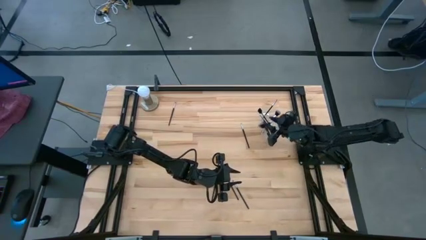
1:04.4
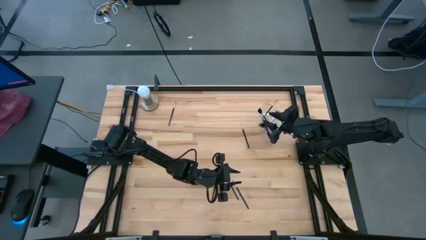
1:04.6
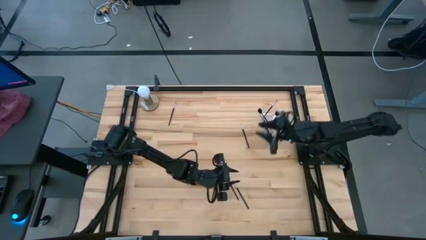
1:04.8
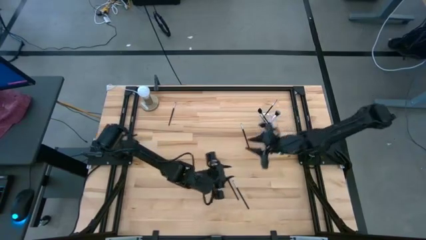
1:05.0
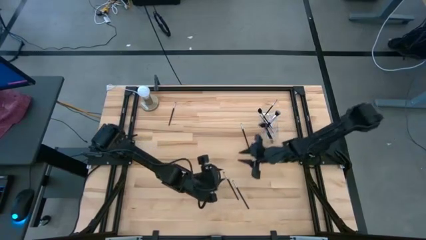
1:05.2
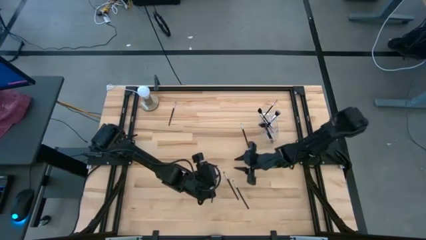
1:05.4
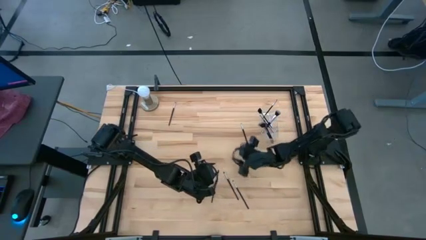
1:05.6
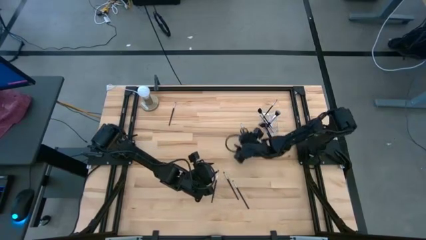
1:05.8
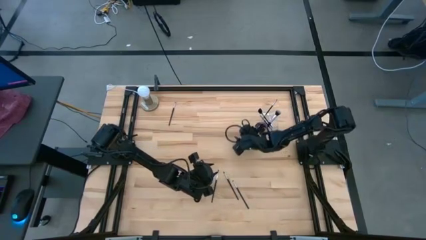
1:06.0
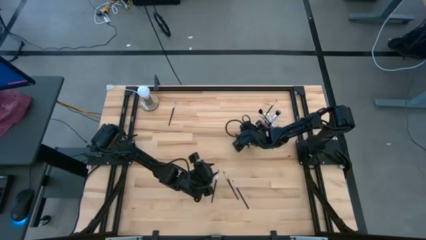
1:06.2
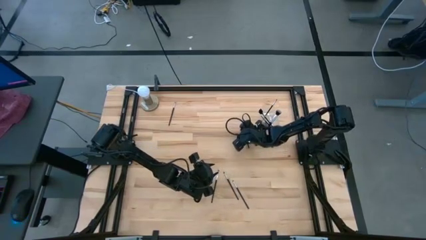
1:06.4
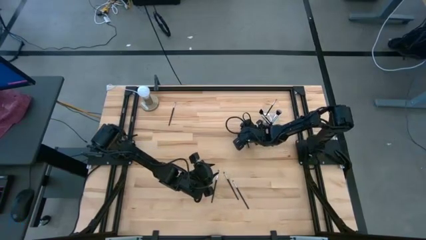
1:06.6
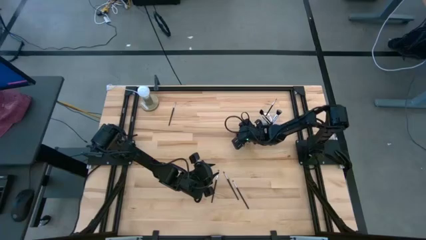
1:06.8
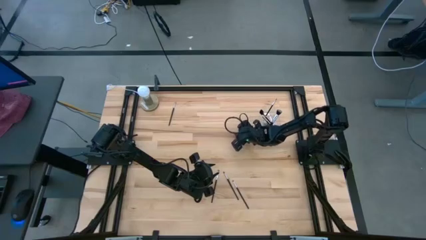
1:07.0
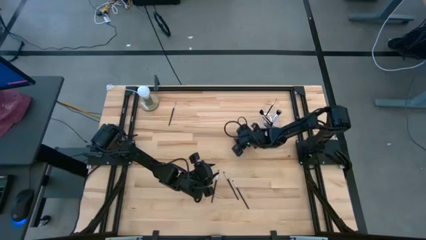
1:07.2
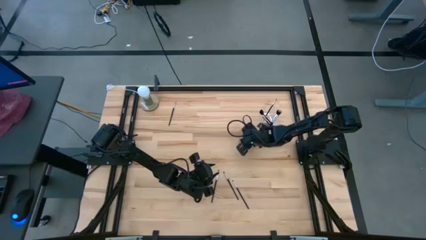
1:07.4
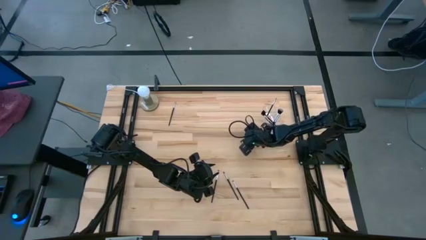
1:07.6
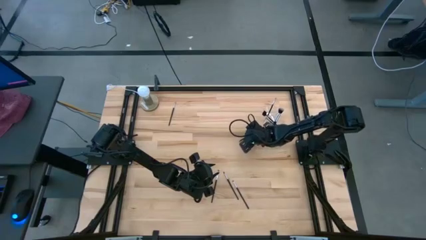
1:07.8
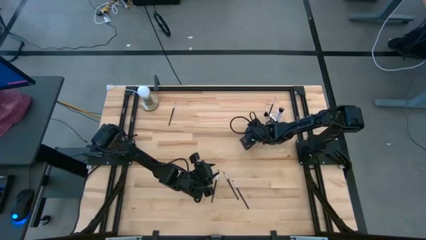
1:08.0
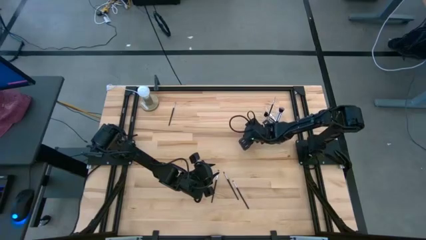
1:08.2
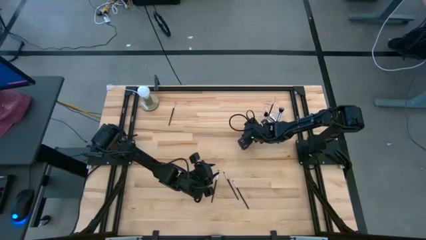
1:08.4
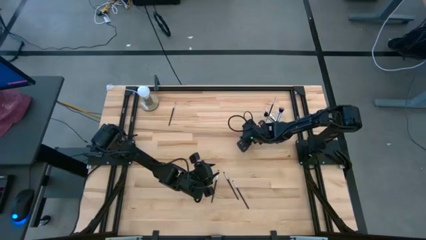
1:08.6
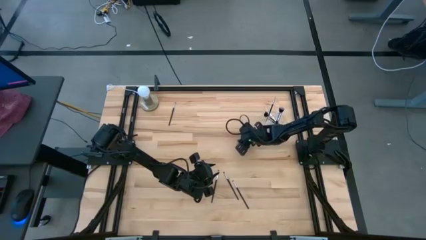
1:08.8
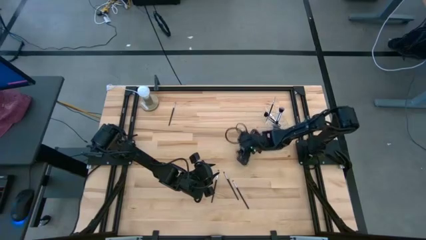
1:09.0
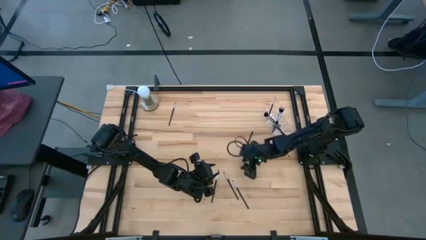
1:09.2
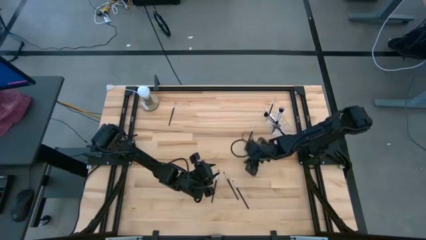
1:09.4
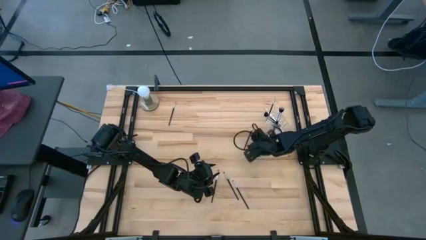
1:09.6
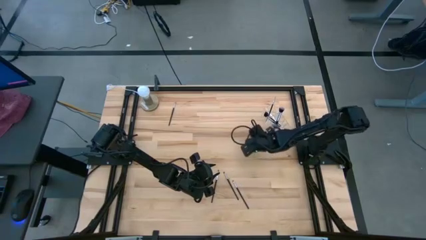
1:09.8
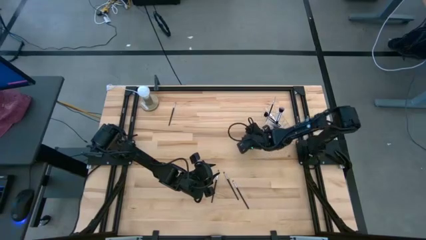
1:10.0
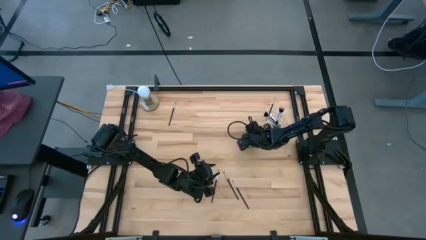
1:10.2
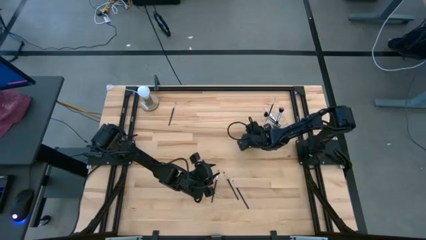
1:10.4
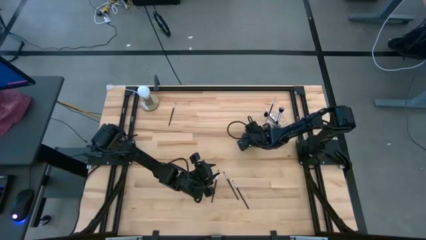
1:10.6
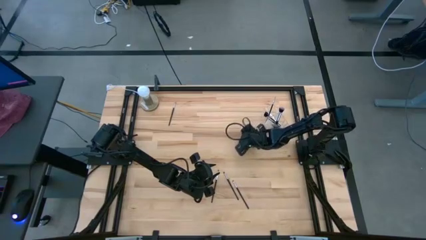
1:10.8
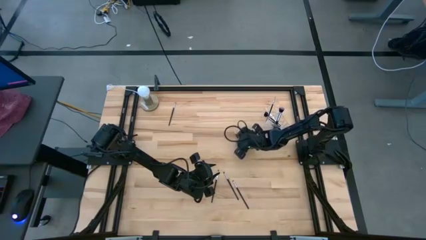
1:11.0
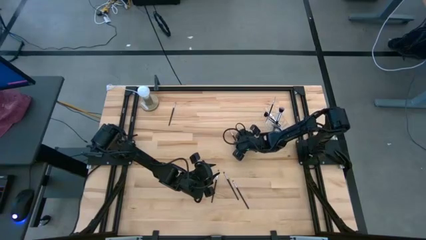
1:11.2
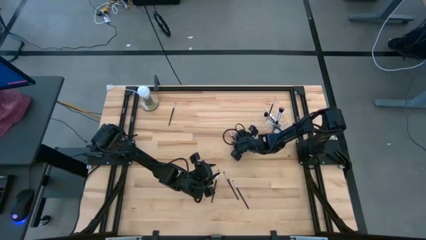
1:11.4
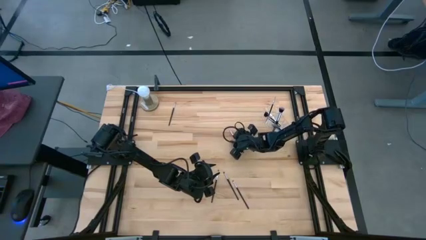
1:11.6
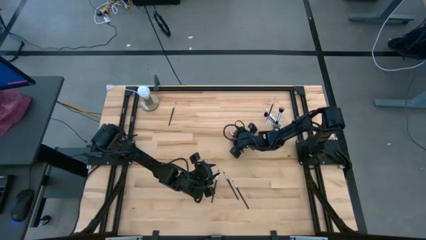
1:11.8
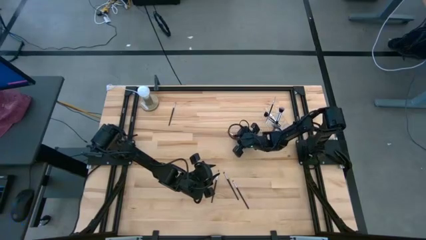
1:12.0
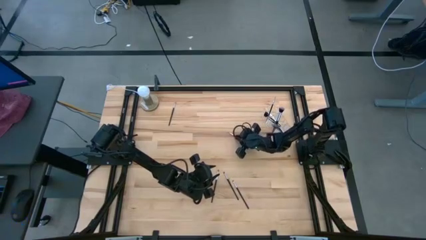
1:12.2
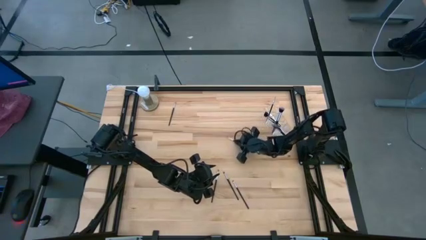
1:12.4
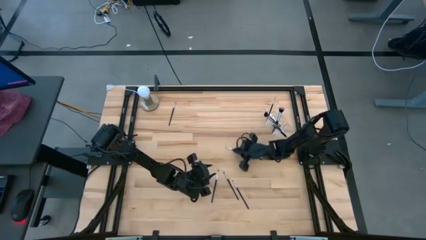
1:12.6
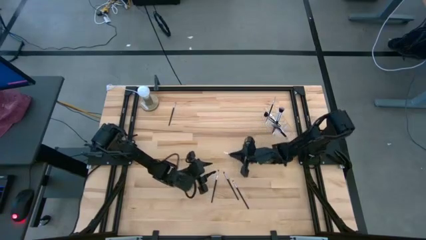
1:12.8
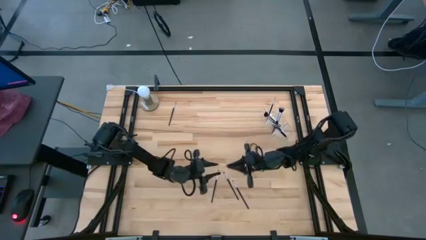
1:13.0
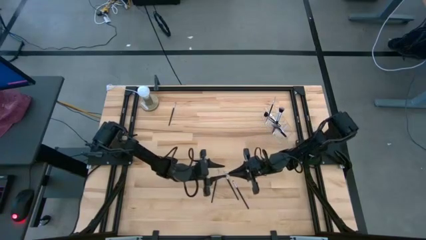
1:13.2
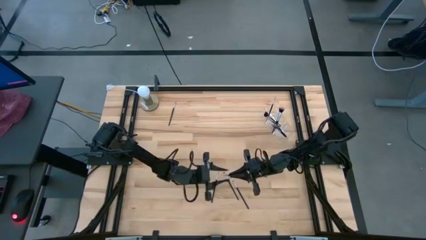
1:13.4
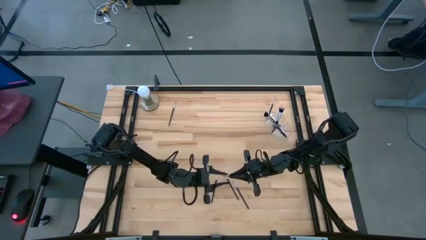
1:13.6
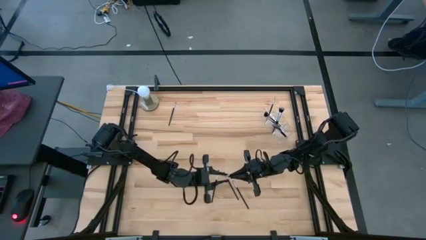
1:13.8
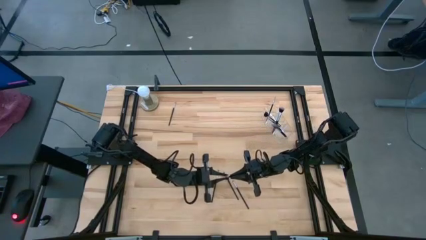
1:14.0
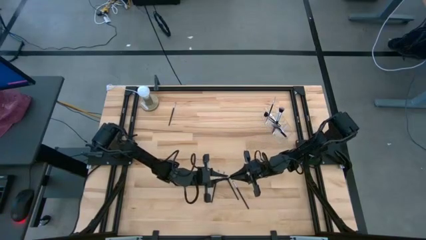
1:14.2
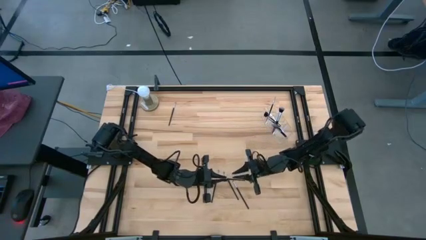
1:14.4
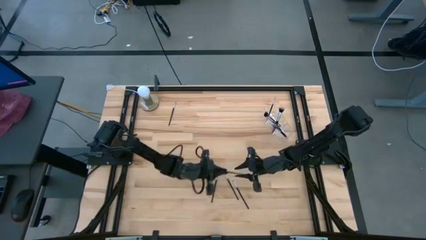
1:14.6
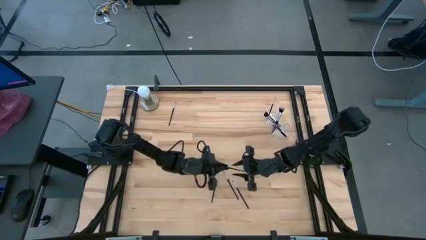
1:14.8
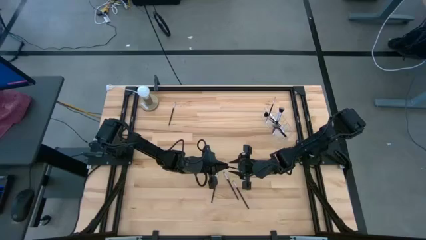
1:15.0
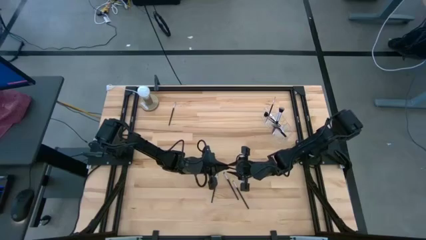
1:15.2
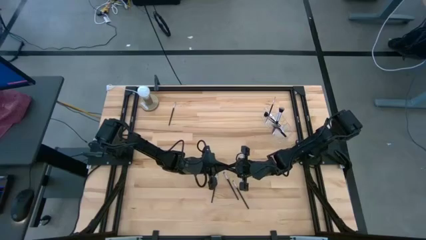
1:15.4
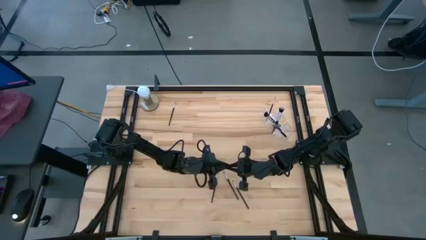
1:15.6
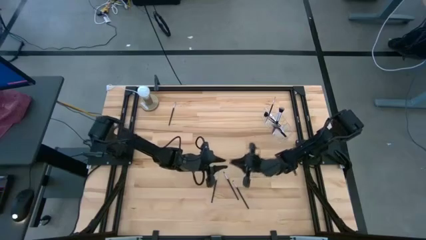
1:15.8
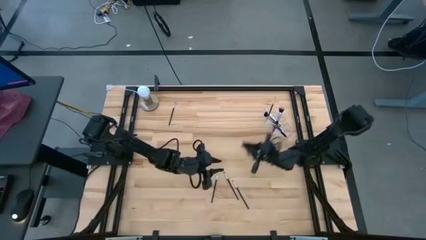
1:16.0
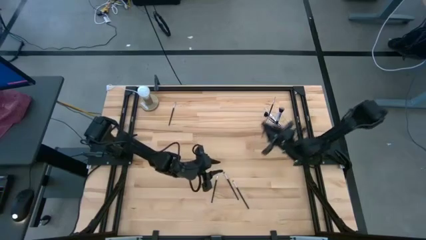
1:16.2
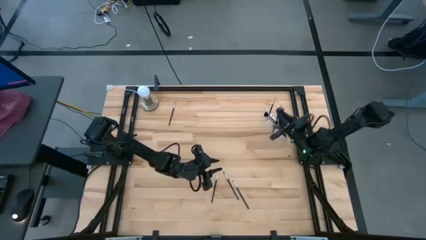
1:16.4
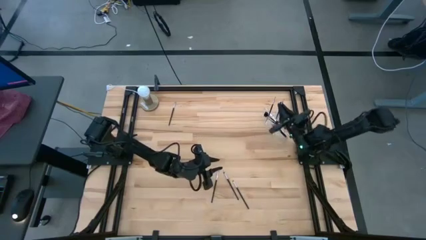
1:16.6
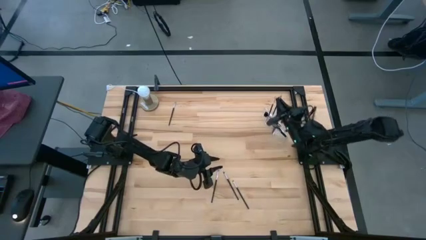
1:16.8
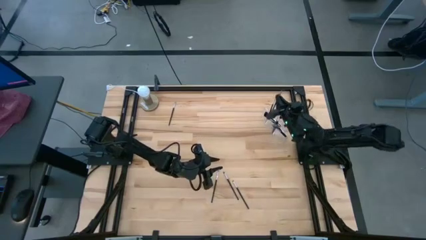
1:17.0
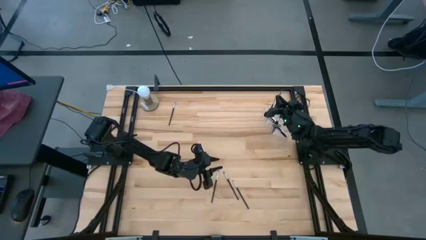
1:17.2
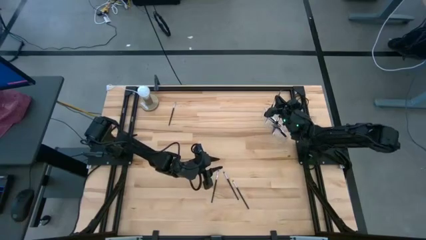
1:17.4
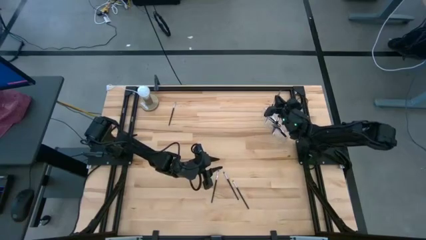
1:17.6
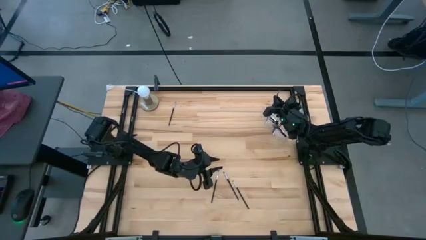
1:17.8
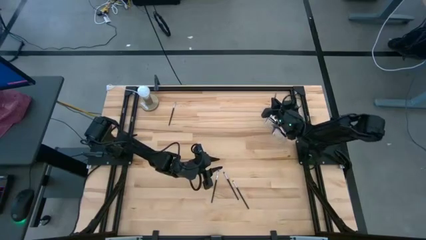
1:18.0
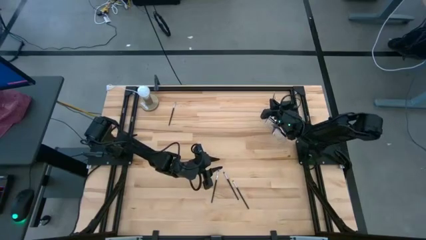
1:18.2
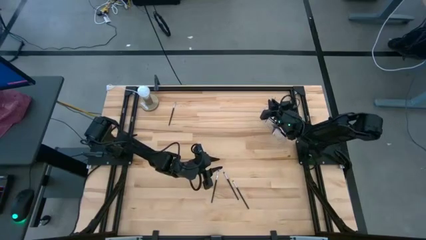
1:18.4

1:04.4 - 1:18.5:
Task: Sort items
Put the silver liner brush into the transparent organizer

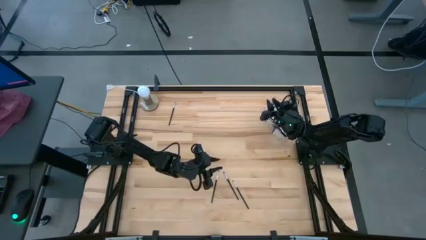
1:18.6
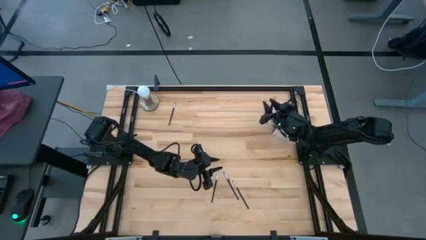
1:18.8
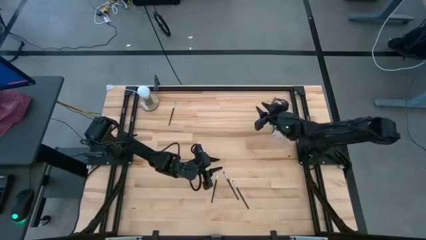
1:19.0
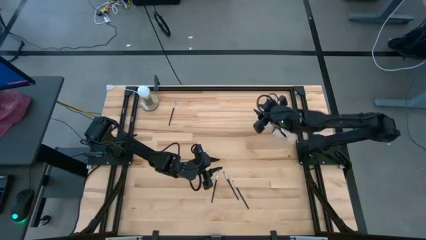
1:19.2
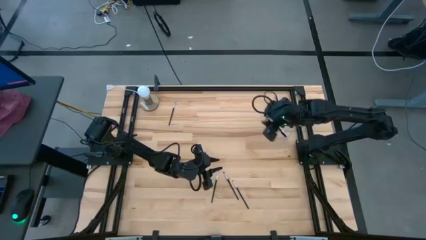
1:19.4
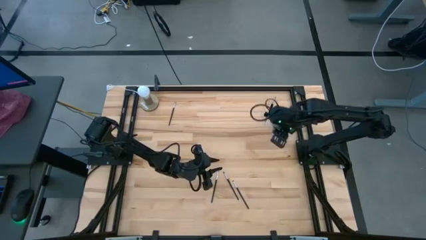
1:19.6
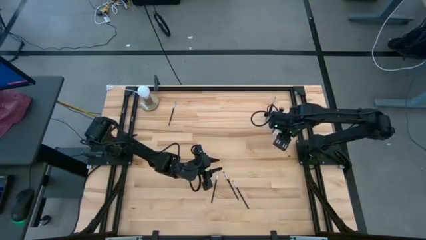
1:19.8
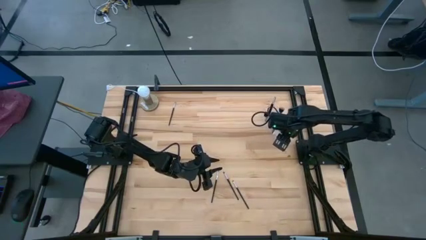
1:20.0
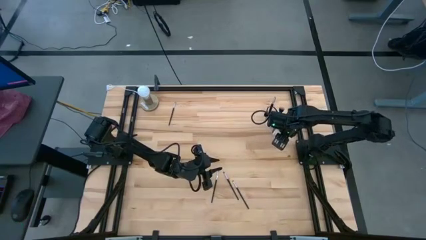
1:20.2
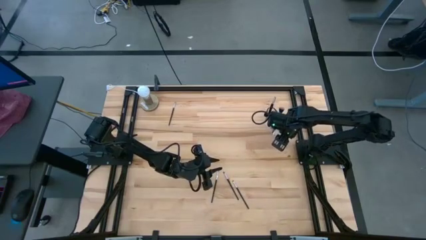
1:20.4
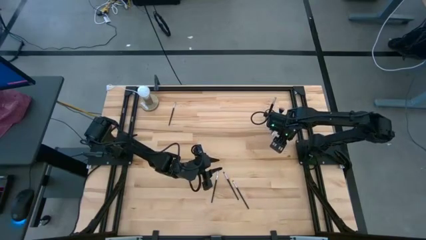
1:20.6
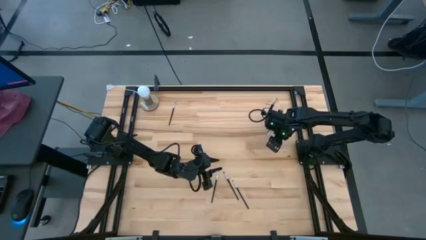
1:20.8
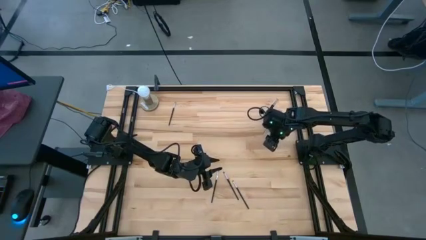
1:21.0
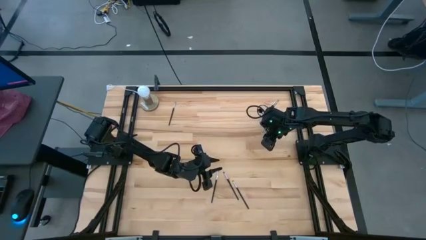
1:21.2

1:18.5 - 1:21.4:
Adjust the transparent organizer
